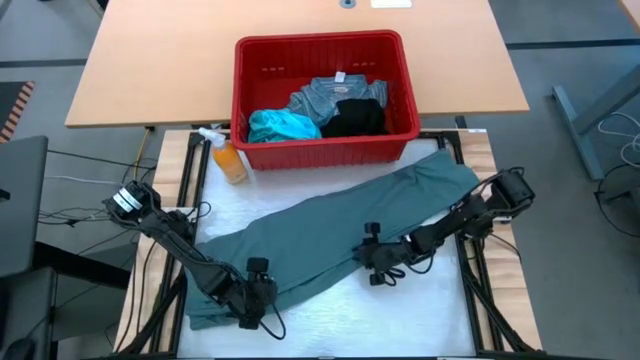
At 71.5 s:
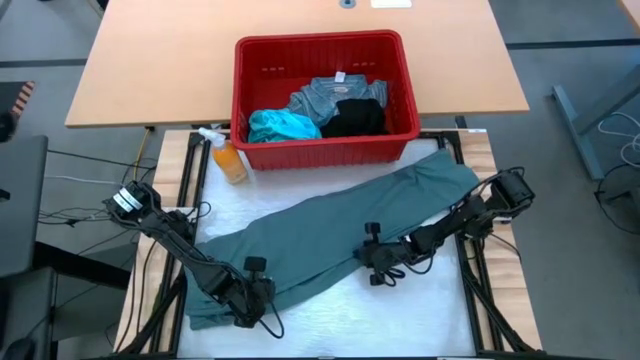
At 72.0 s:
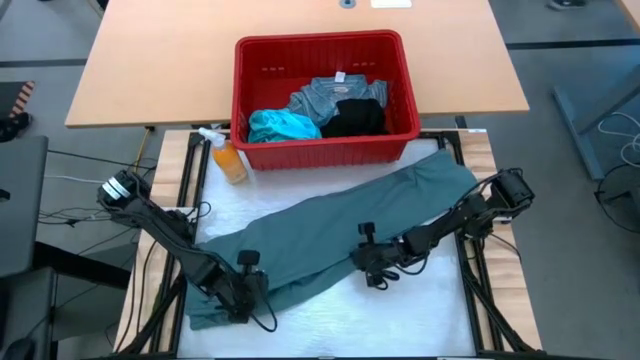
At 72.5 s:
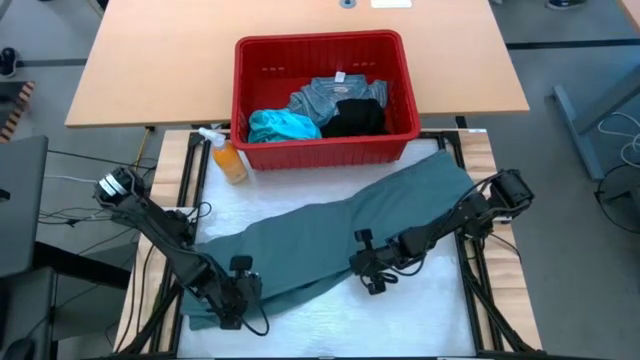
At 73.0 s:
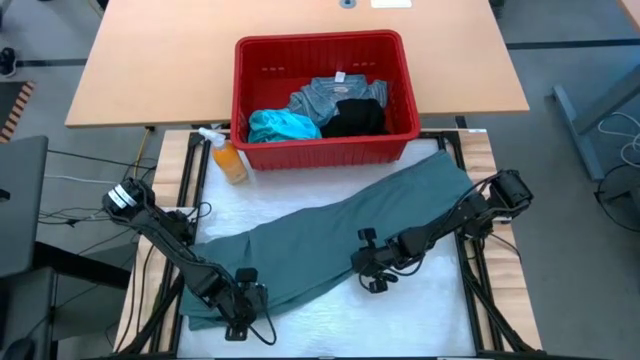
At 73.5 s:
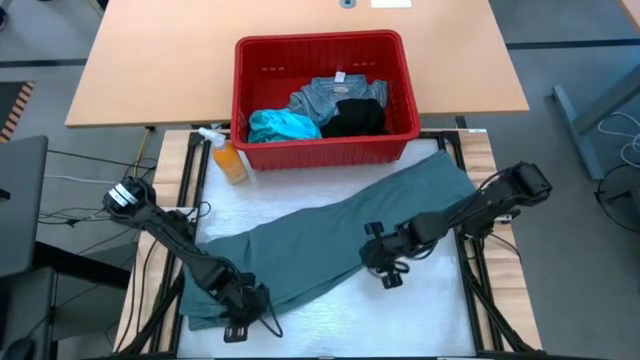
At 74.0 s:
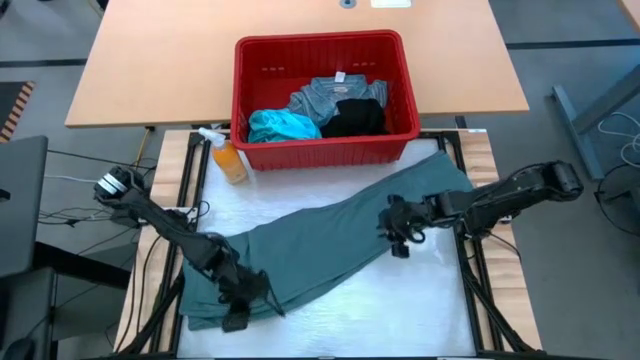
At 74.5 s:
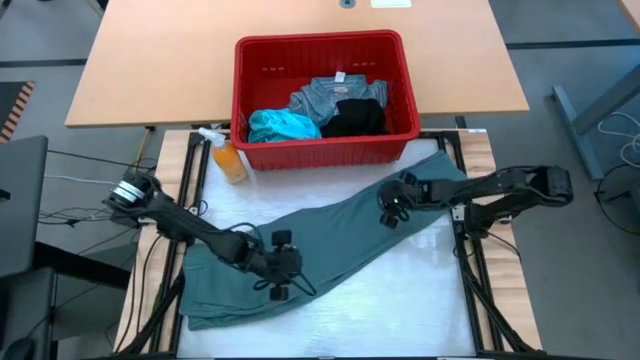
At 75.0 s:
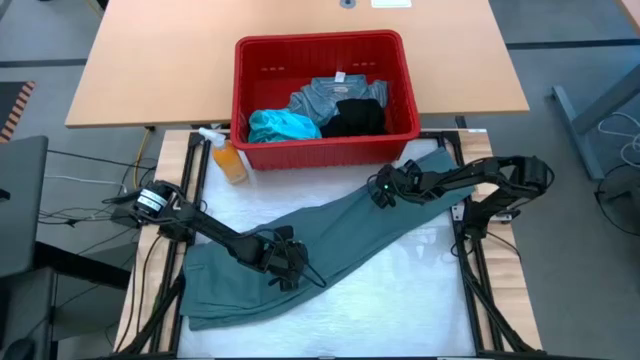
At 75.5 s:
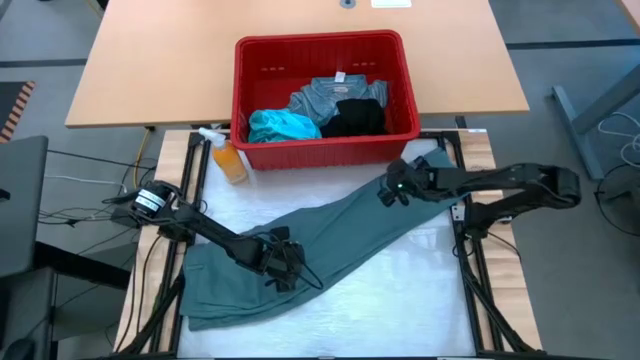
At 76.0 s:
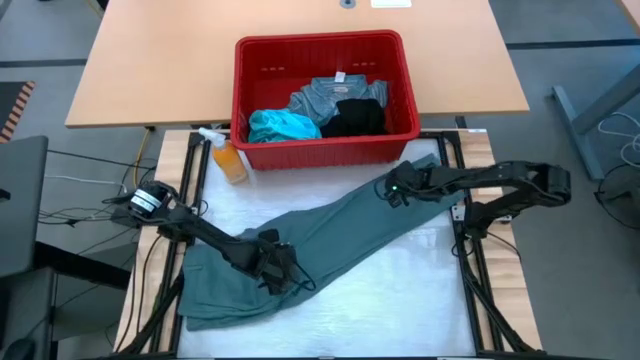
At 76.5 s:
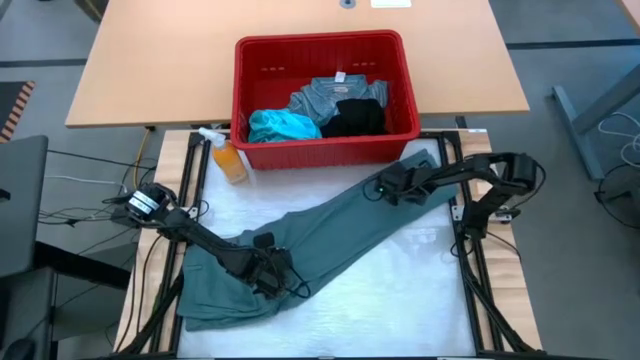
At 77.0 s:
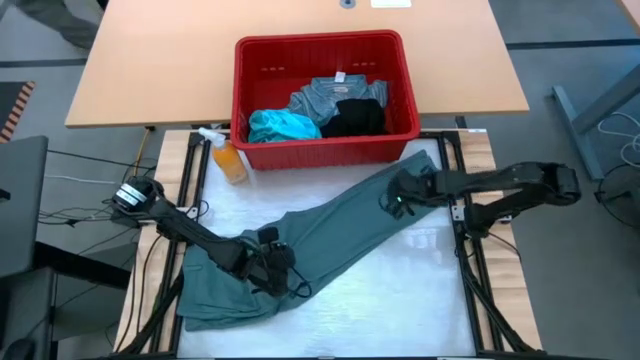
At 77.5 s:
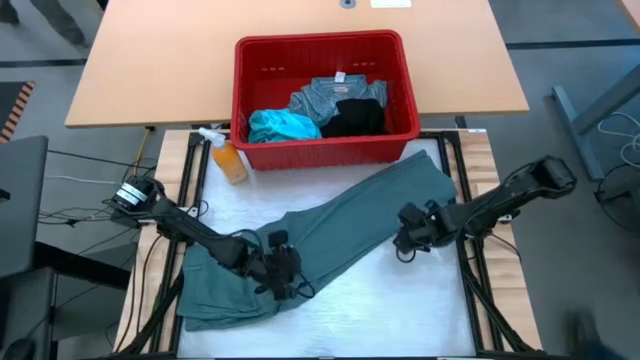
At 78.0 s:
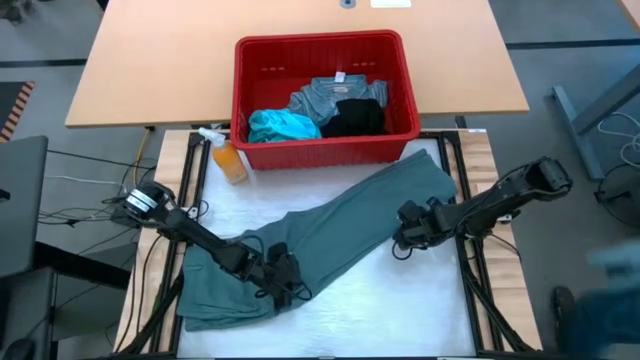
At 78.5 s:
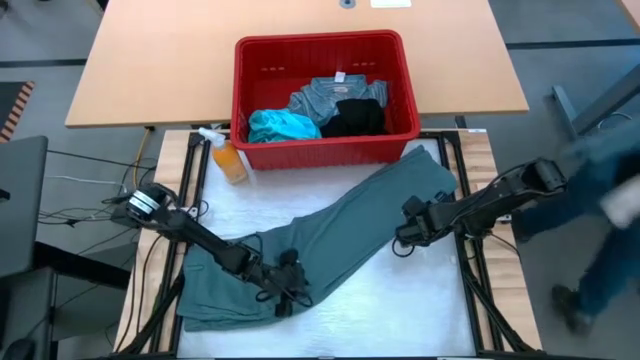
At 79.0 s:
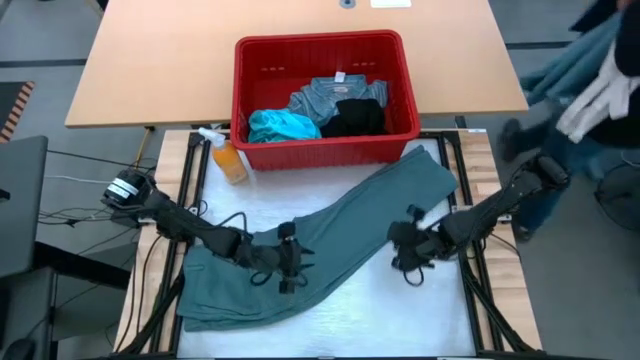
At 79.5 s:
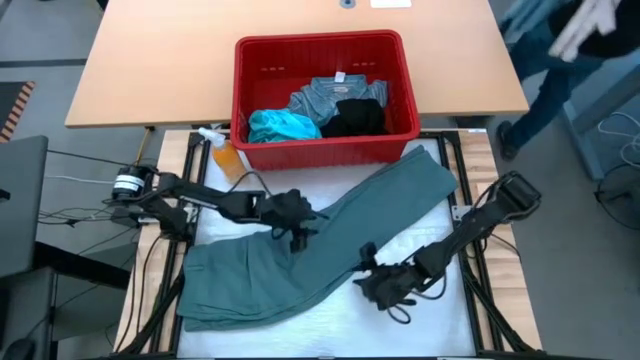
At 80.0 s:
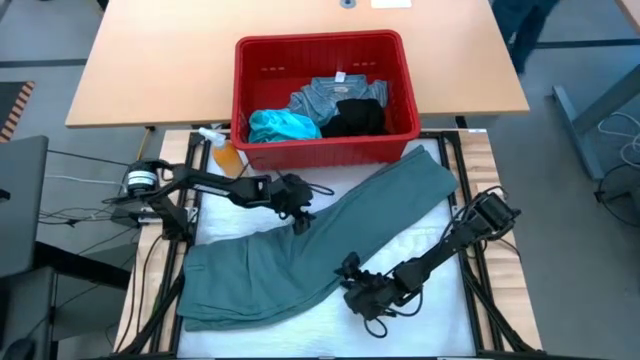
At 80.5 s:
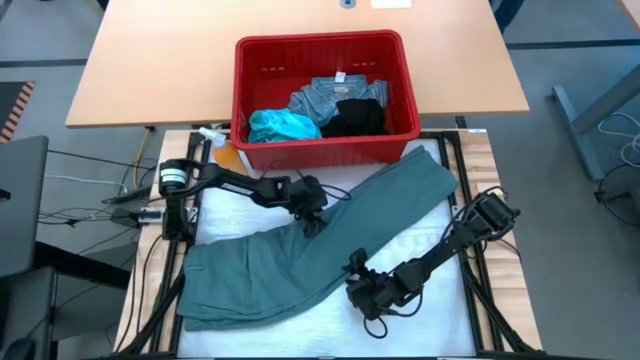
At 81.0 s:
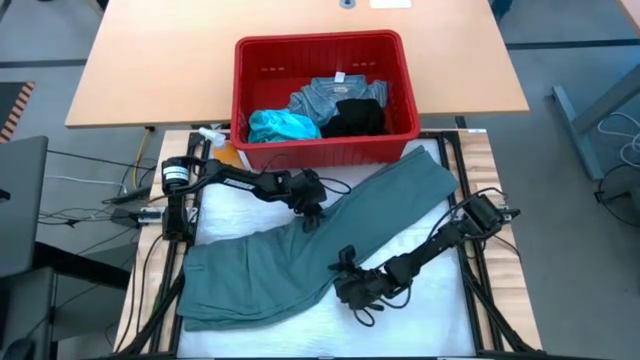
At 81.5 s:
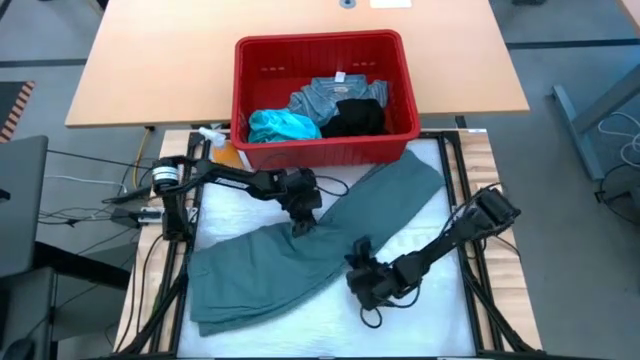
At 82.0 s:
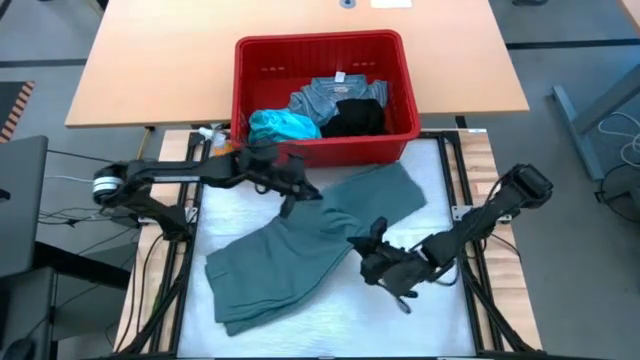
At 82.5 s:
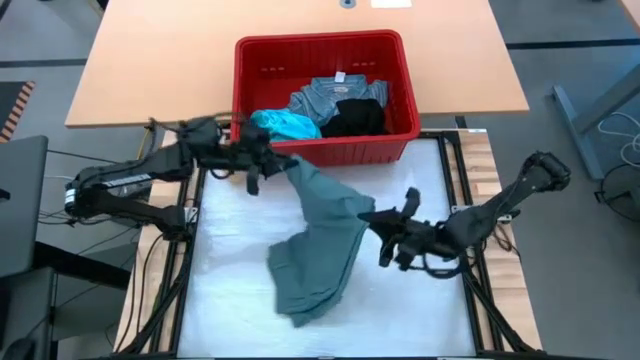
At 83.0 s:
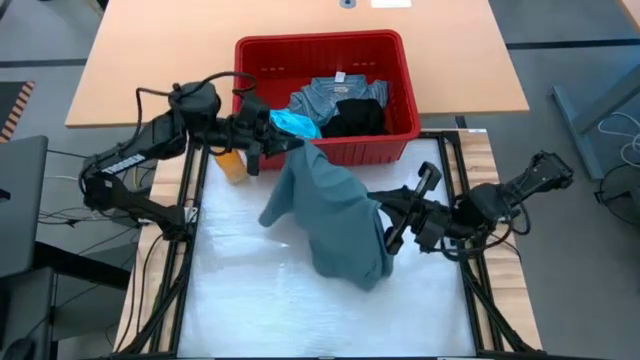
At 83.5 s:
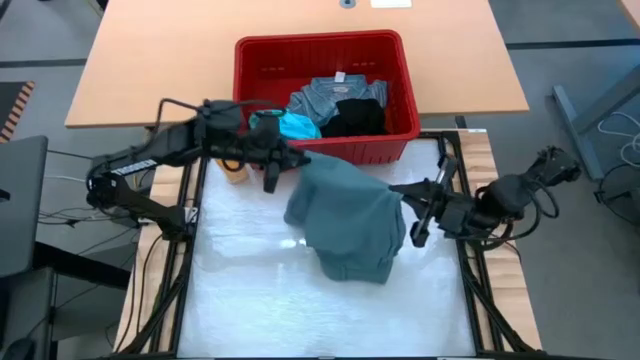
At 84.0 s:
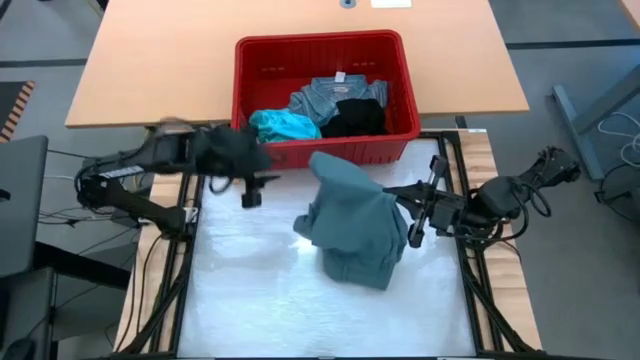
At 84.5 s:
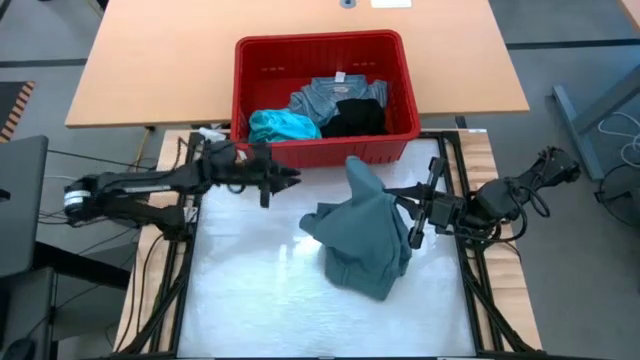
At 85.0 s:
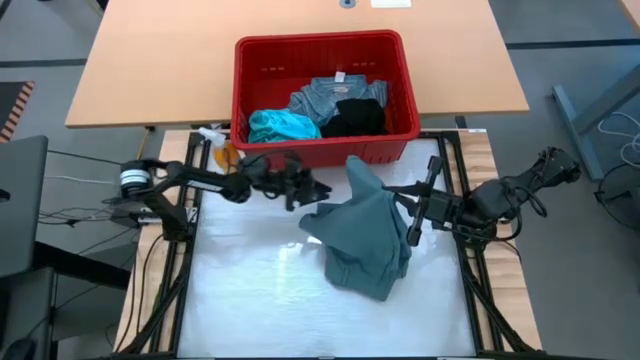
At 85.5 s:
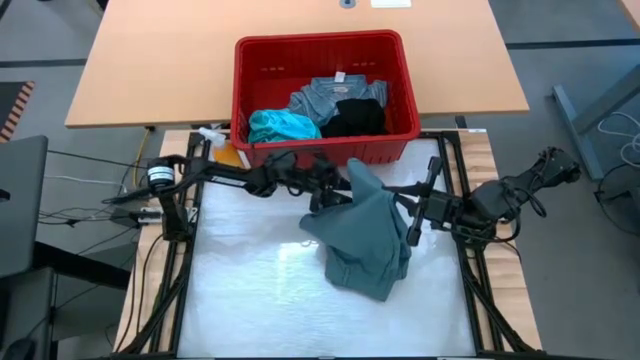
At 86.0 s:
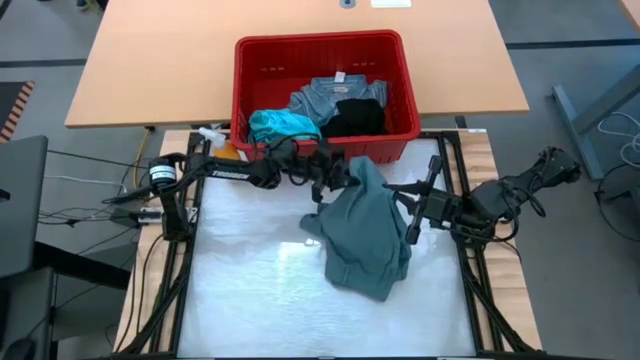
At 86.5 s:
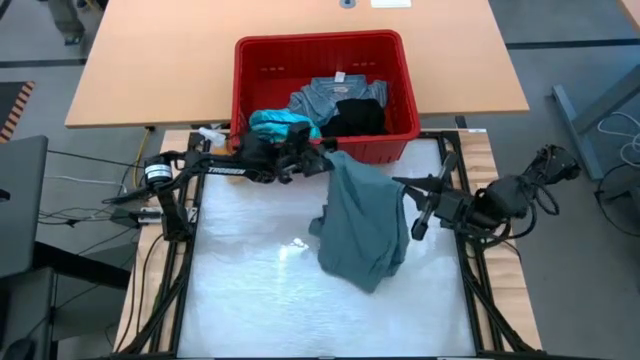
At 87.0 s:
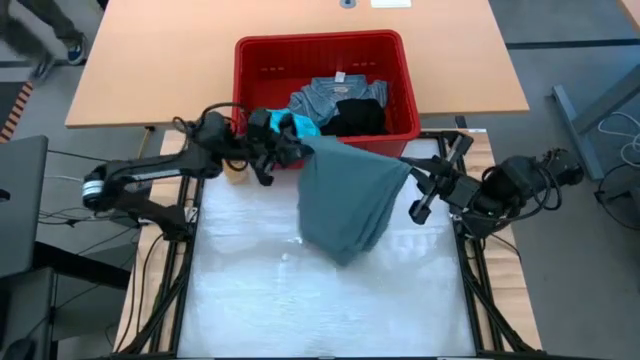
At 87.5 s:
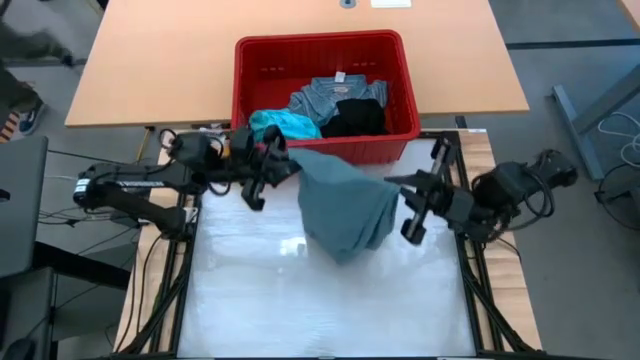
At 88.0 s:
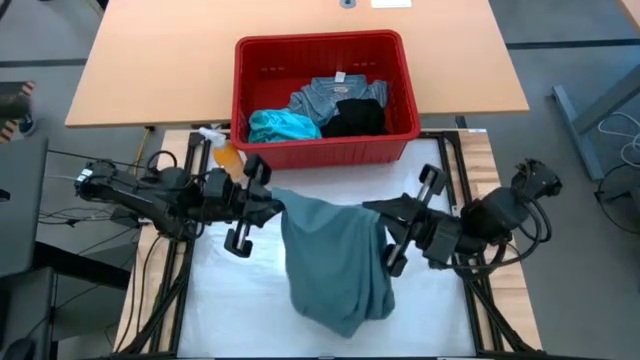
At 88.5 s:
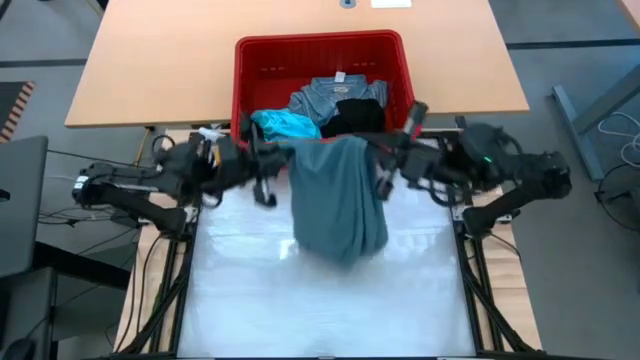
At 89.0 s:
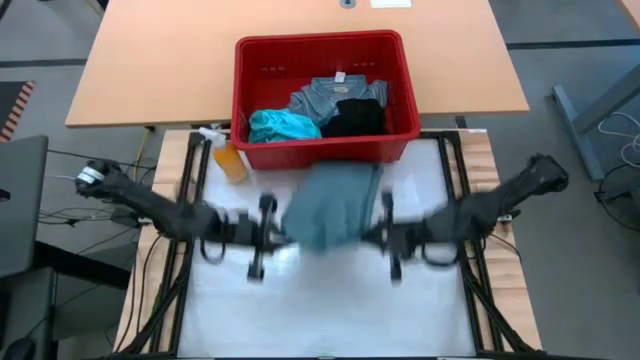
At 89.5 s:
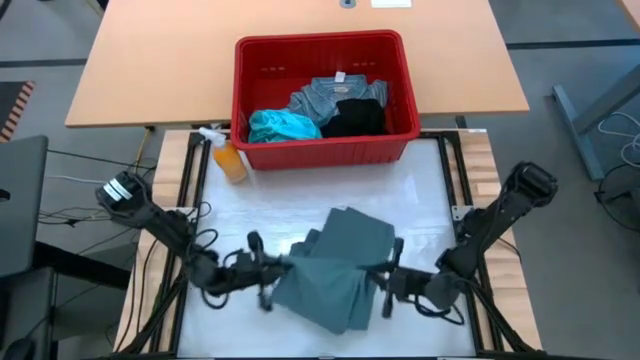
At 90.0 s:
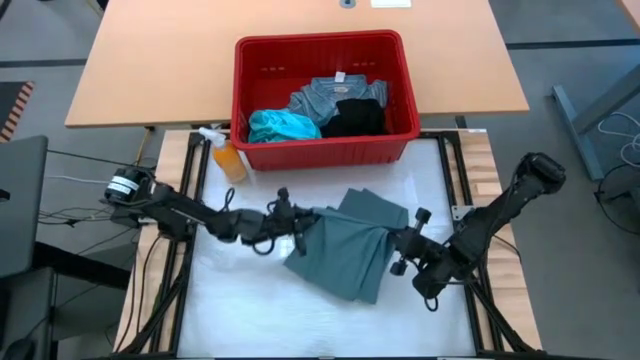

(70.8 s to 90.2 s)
Task: Fold Laundry from Bin
Fold the gray pants

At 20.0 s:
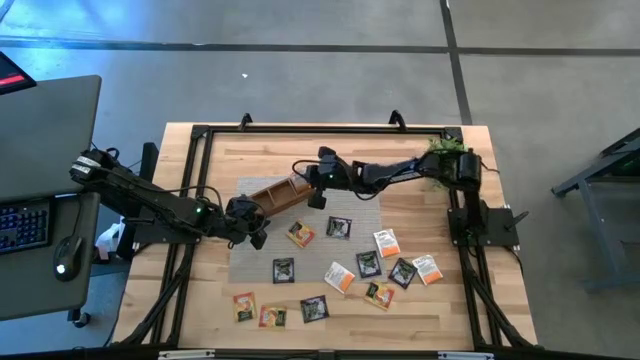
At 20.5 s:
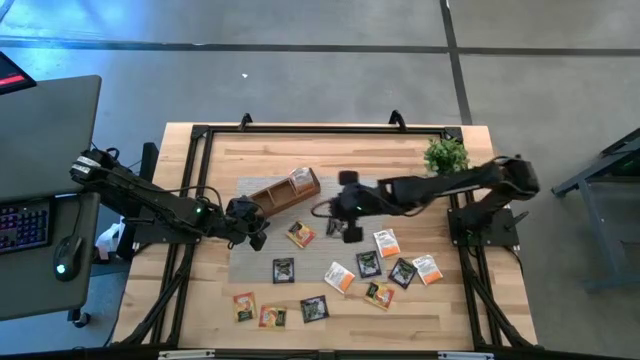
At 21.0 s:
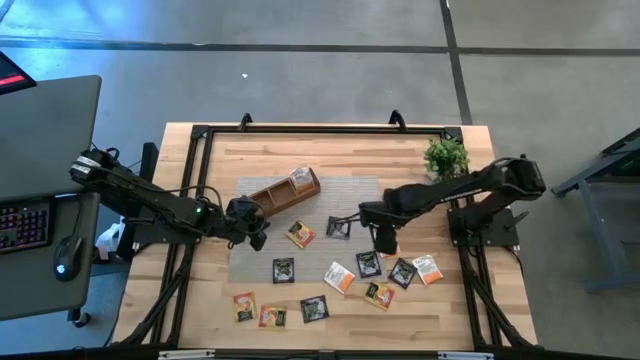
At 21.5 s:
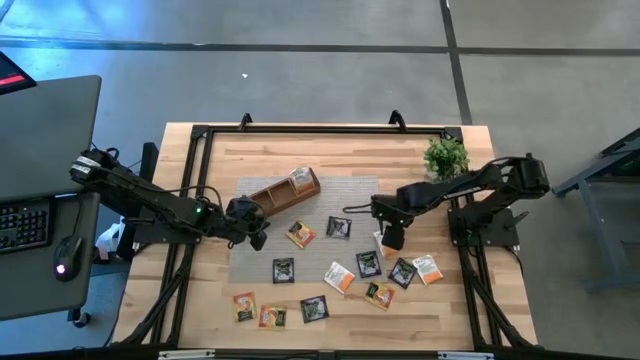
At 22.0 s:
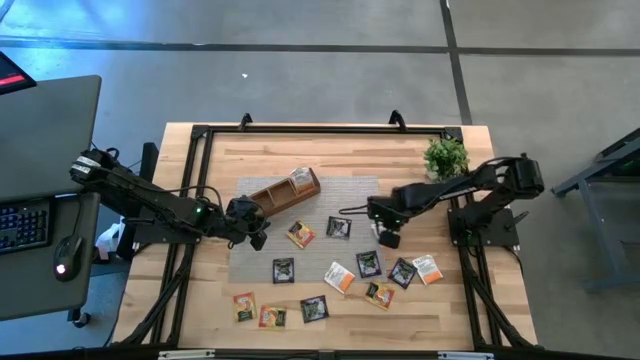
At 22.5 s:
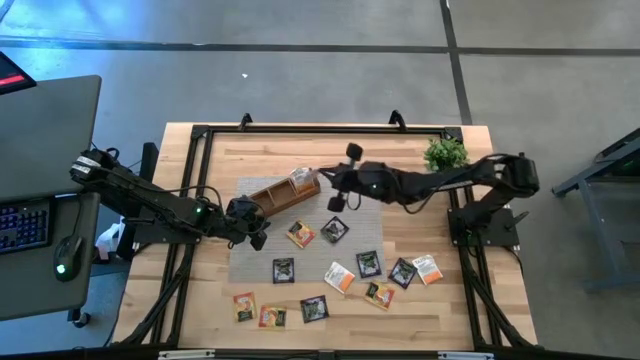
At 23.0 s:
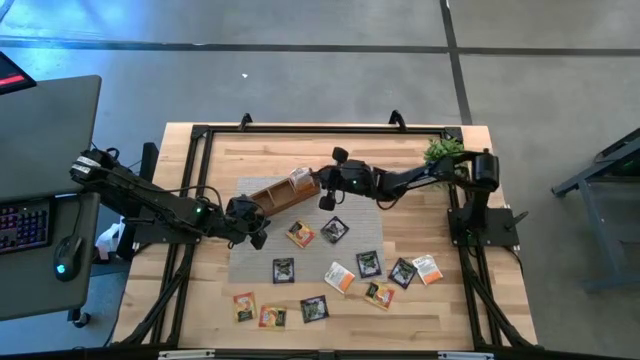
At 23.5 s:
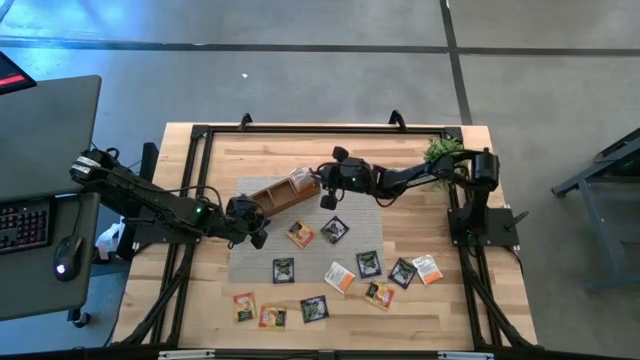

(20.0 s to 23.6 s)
Task: Pick & Place Tea
Put the orange tea bag into the right section of the wooden organizer
